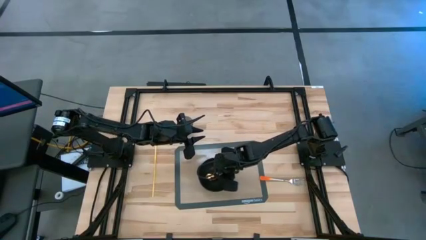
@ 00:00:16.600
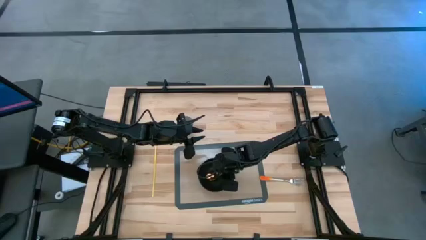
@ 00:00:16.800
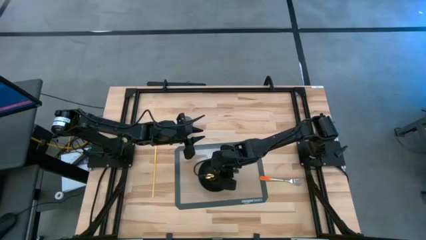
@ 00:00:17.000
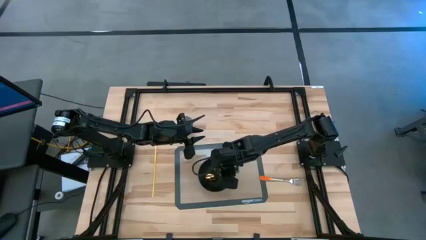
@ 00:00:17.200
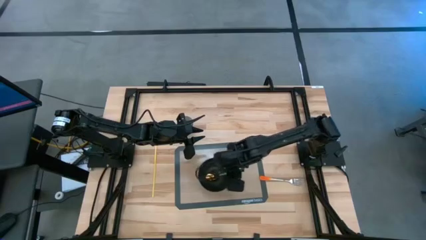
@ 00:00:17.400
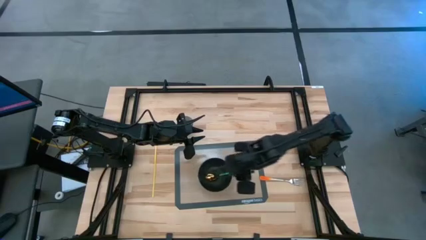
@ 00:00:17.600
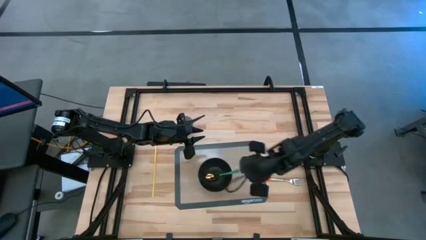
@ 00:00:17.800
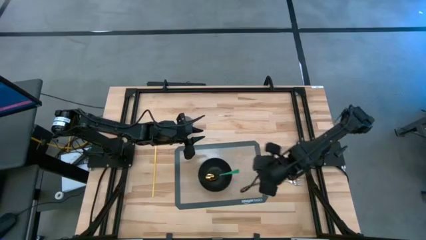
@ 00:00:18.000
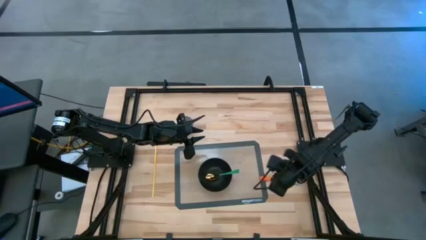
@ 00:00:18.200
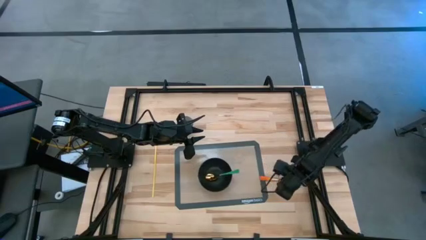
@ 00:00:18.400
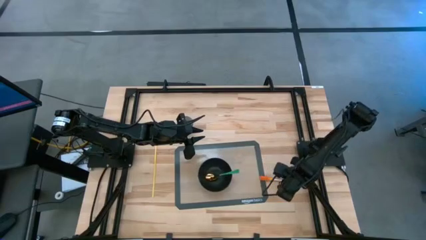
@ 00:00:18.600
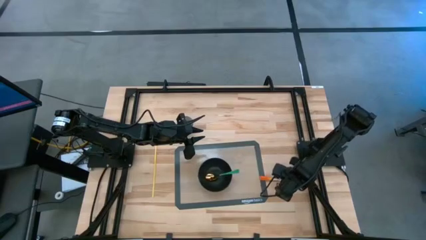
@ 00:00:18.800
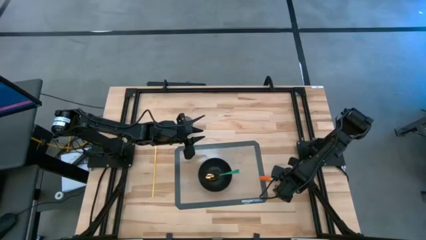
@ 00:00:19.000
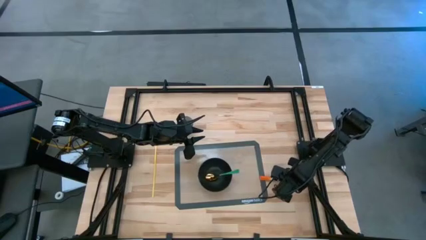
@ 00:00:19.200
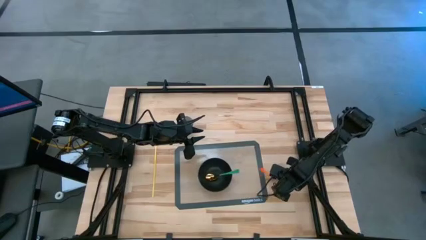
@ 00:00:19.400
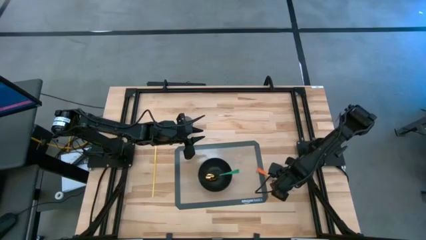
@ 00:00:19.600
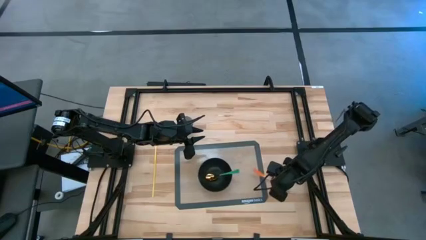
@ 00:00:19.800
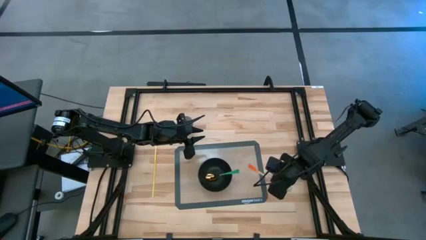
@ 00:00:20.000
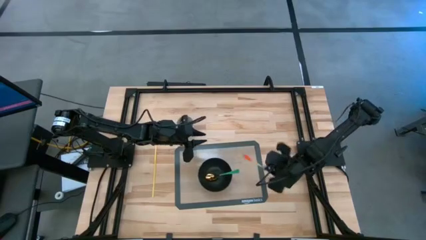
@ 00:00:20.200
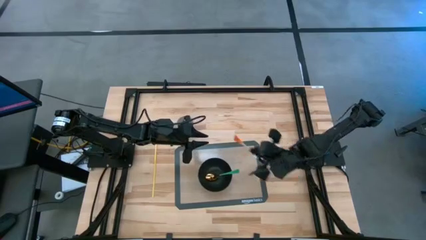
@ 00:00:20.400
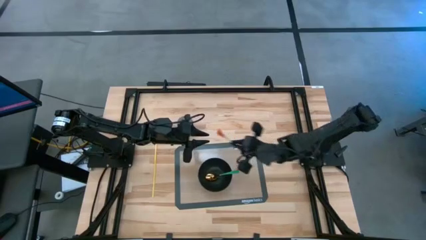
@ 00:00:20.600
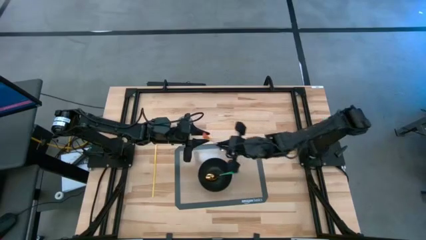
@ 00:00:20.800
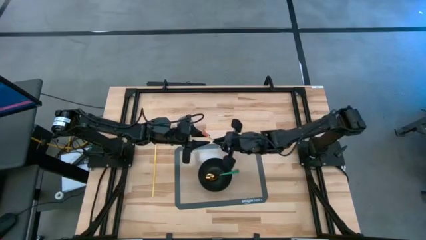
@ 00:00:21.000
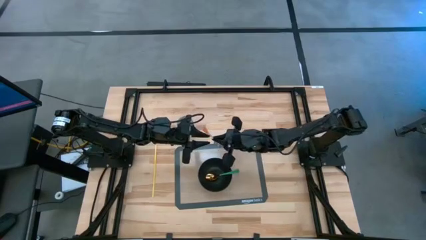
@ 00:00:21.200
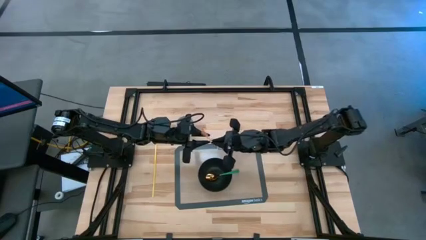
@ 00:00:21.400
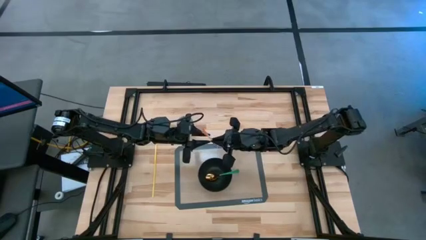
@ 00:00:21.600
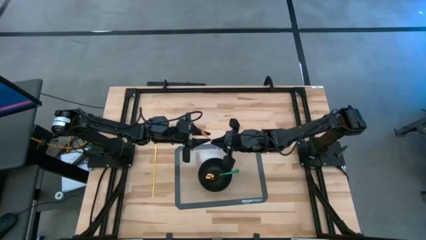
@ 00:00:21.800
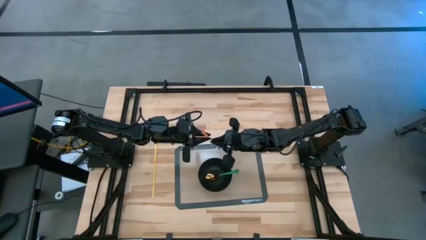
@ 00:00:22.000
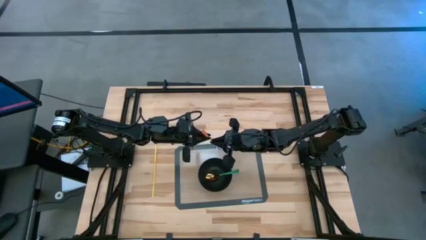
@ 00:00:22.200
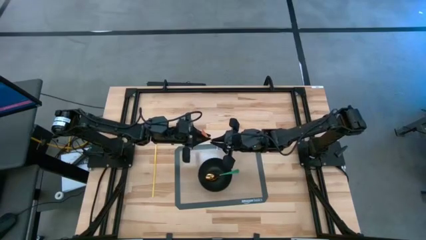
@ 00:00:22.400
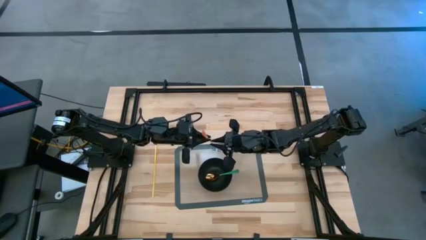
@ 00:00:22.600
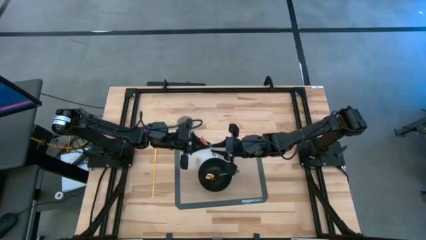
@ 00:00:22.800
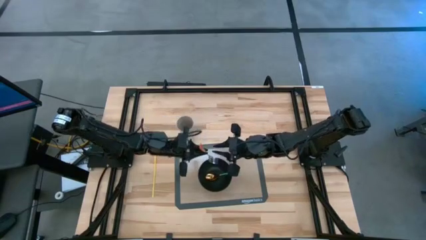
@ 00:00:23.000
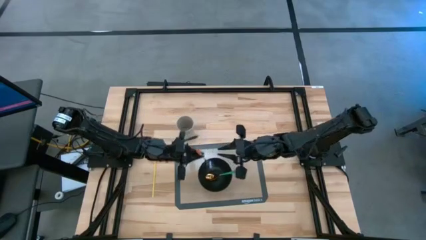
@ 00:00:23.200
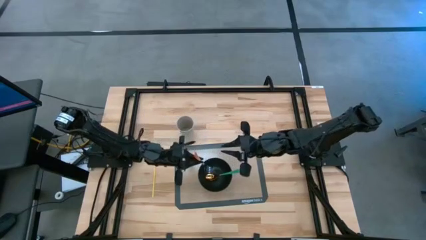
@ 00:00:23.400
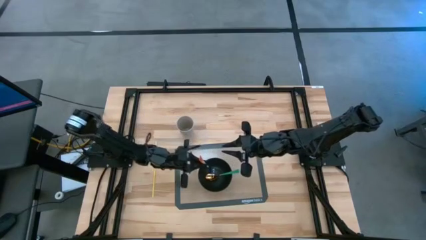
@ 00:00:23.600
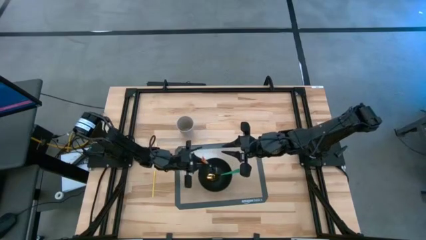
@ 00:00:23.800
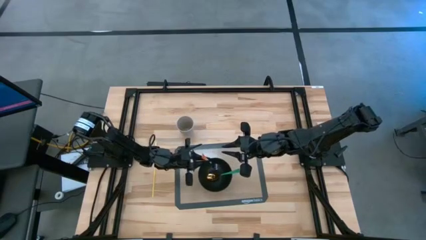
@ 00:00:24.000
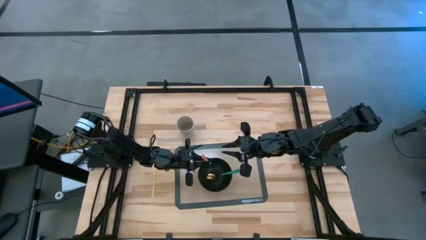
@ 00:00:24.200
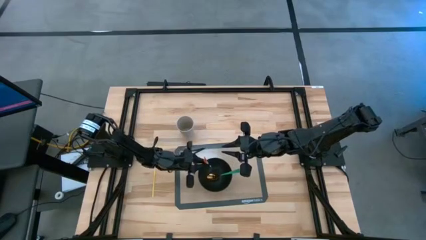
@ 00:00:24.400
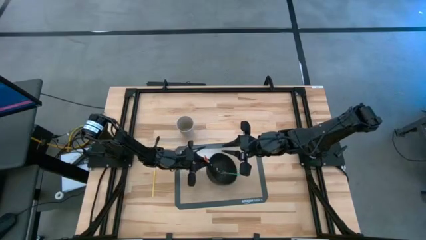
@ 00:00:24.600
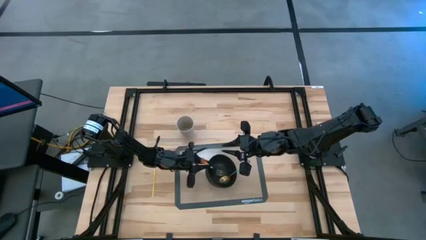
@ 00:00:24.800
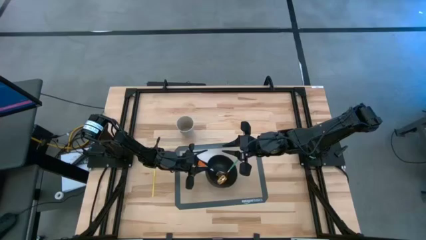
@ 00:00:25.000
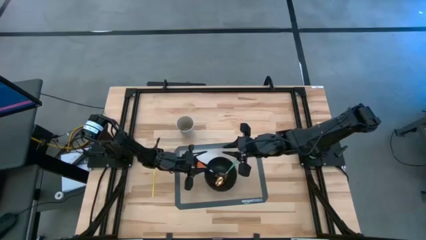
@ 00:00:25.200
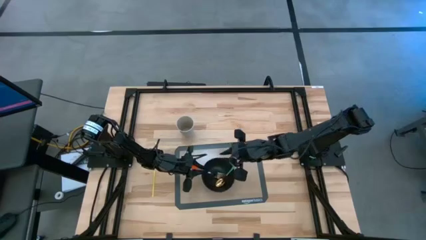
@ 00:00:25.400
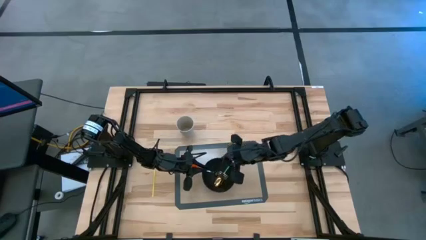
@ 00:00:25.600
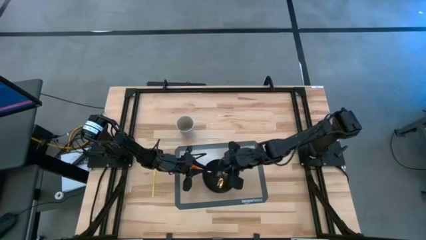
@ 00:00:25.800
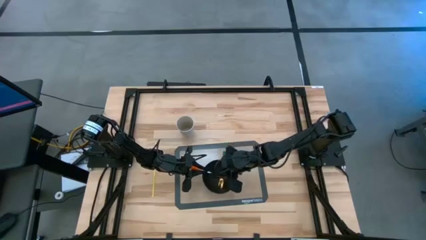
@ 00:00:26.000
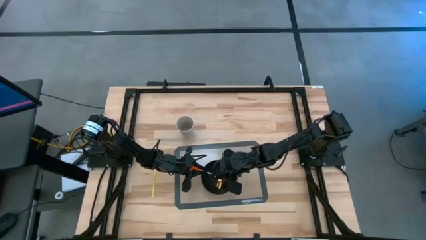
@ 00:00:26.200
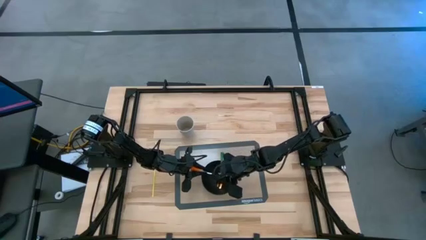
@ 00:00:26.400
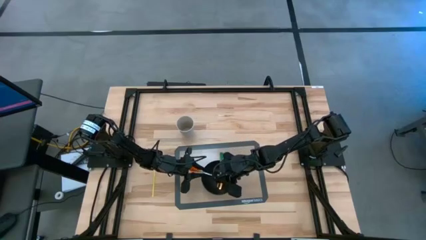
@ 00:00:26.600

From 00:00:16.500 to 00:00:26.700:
Task: Pick & Place Utensil
Put the orange fork into the black bowl on the transparent mat

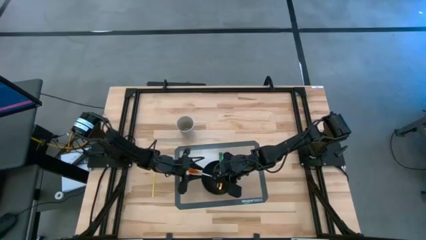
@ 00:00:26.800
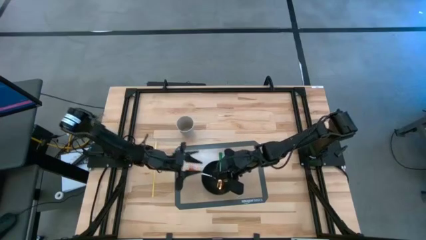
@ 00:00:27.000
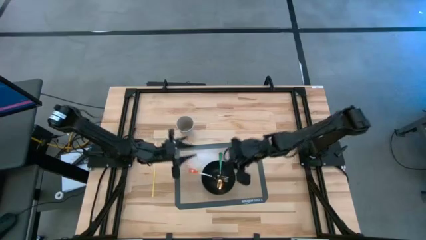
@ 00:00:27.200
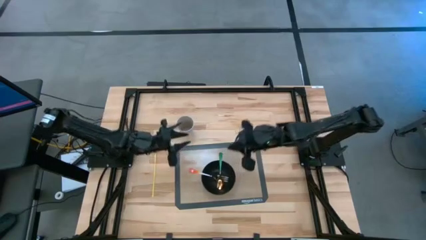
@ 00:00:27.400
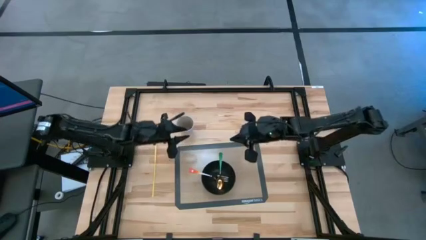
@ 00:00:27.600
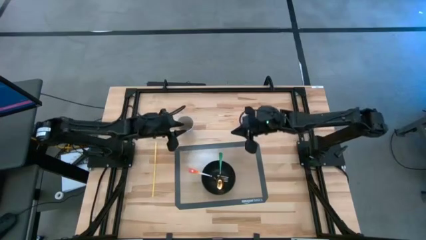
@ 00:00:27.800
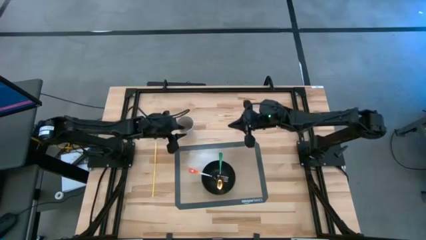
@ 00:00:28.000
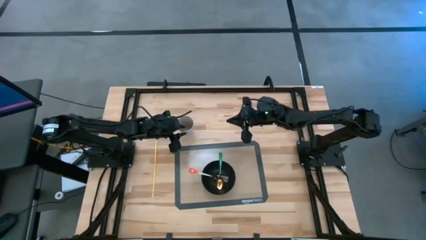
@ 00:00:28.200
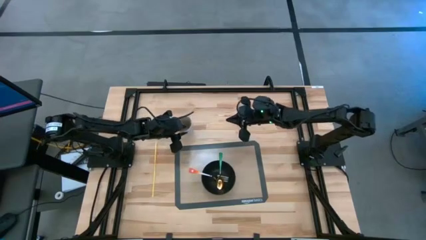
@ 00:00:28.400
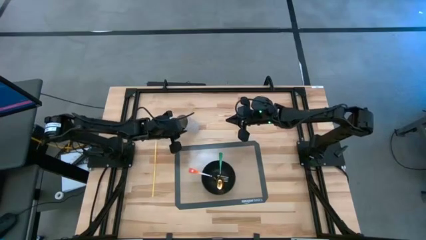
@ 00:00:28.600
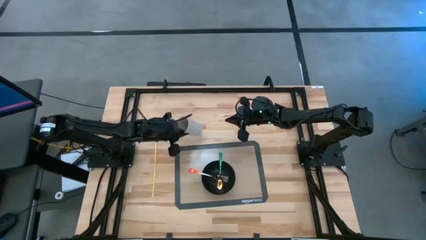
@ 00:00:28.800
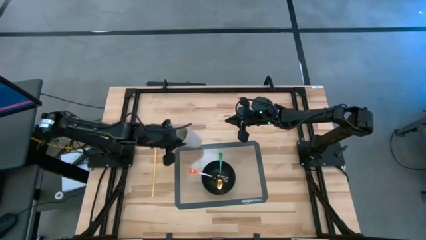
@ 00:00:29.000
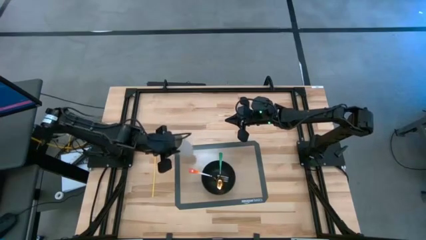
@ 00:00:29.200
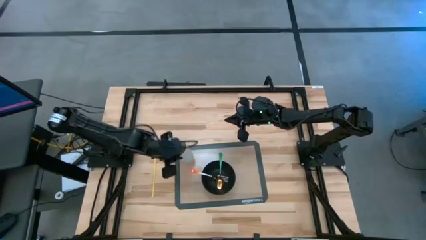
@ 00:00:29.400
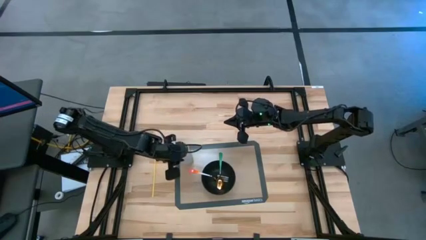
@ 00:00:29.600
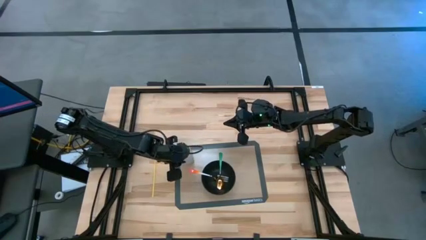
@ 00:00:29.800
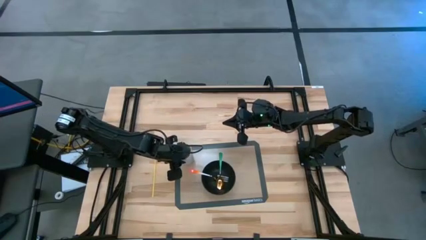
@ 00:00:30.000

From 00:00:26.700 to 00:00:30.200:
Put the white cup to the top left of the black bowl on the transparent mat

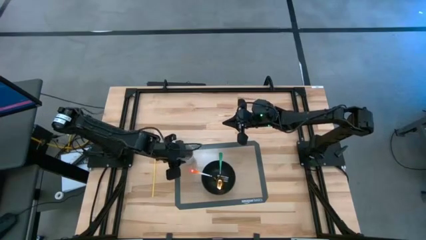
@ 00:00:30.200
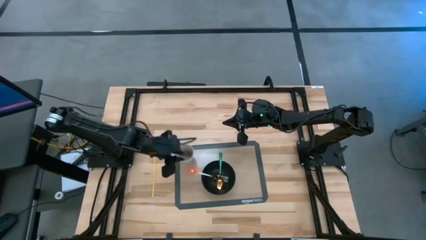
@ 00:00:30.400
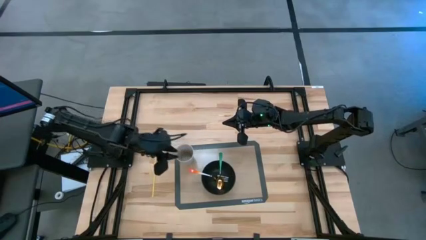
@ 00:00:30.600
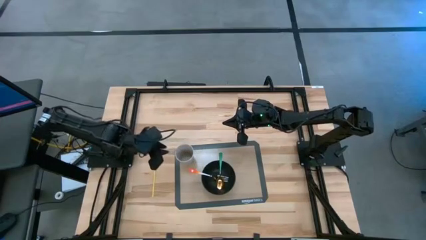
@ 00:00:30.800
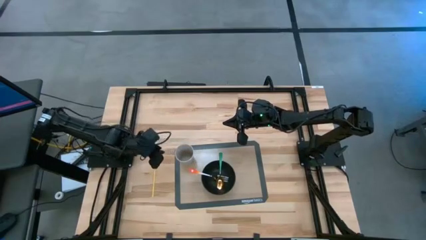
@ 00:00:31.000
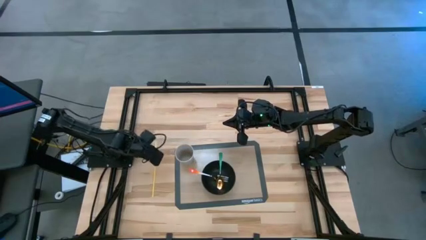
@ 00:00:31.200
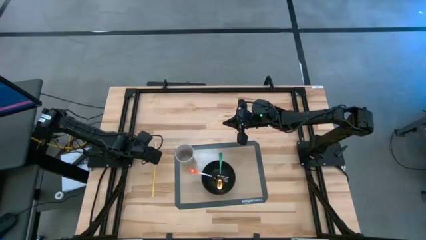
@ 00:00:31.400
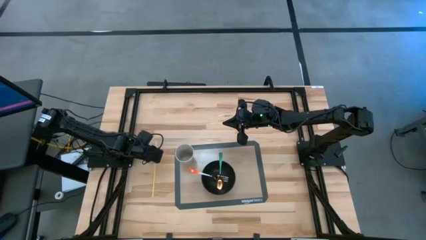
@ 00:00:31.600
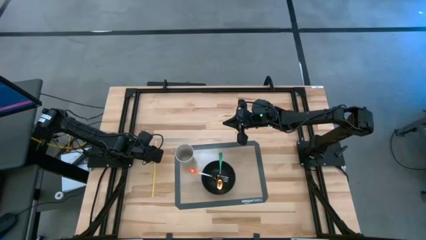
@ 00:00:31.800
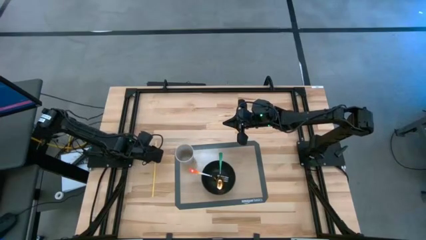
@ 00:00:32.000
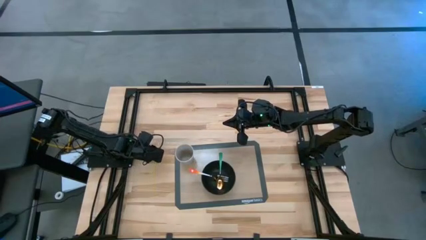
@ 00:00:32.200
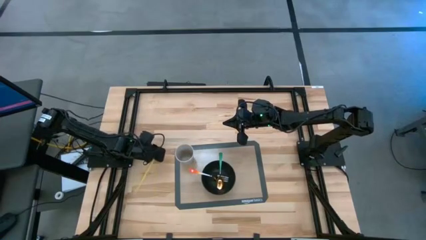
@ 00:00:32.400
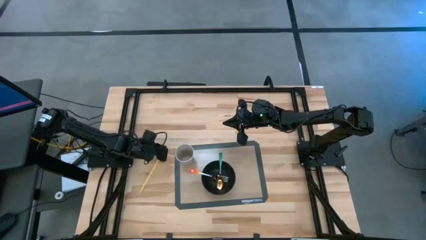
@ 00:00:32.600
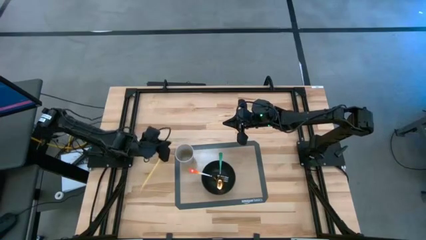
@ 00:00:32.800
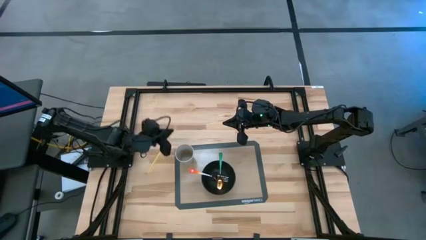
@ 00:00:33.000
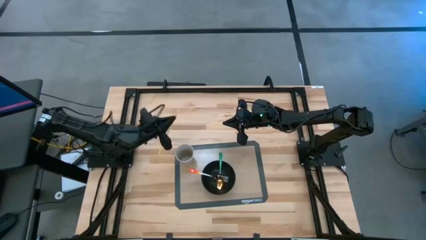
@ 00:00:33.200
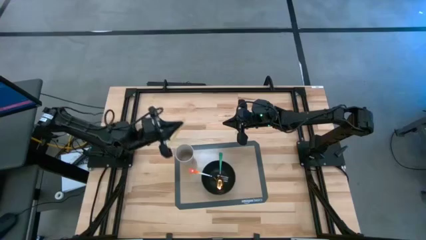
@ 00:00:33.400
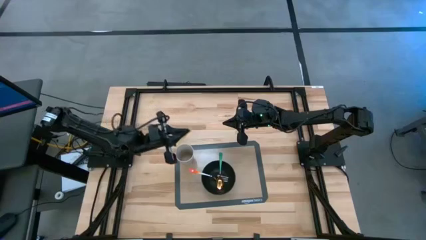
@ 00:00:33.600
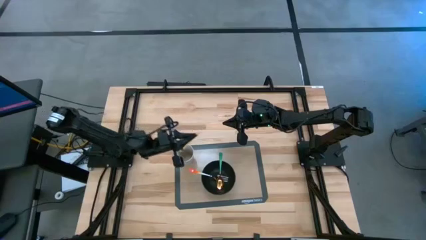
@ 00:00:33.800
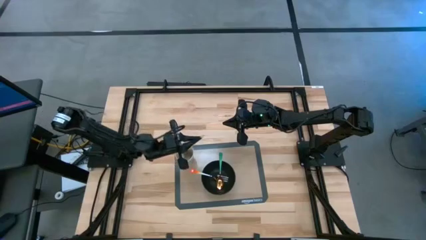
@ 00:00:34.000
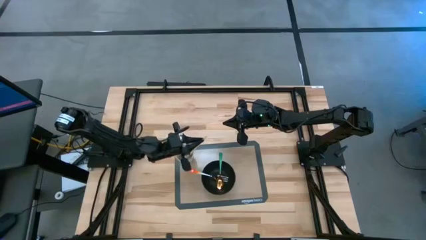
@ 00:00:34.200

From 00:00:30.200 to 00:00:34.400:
Put the orange straw into the white cup on the transparent mat
